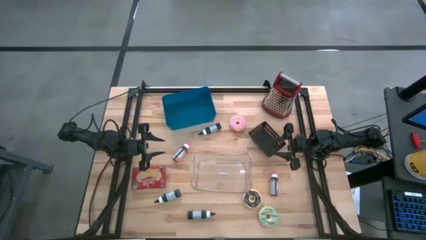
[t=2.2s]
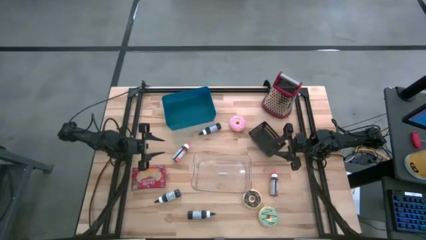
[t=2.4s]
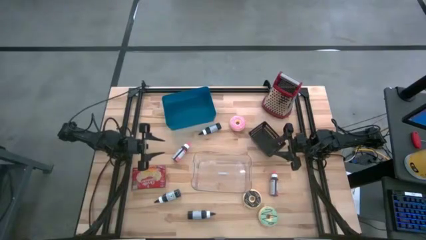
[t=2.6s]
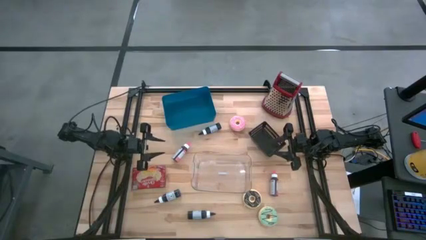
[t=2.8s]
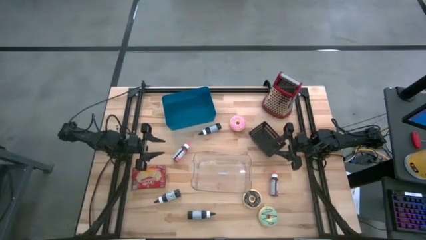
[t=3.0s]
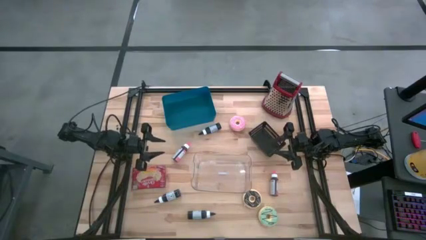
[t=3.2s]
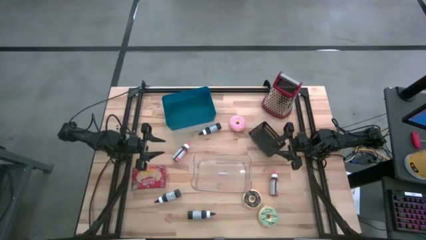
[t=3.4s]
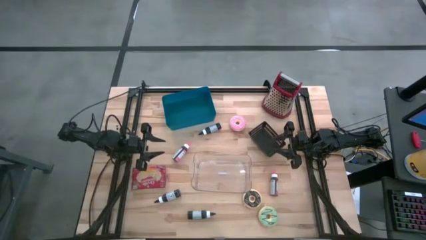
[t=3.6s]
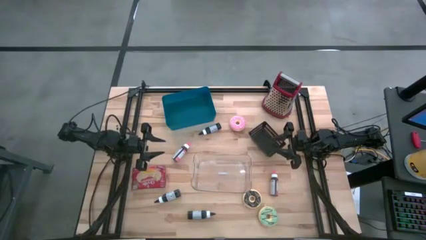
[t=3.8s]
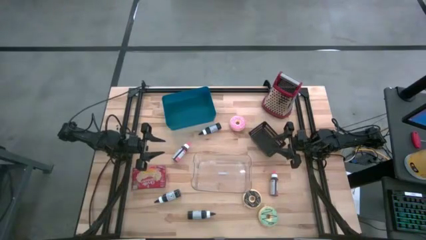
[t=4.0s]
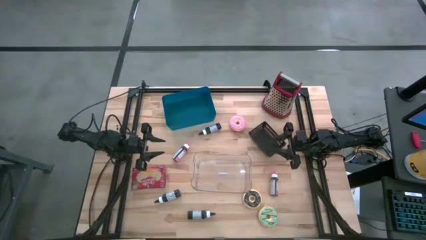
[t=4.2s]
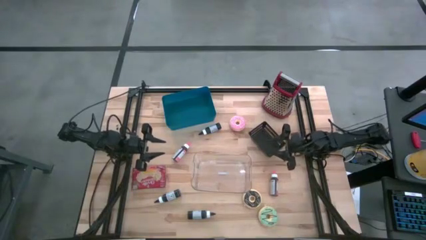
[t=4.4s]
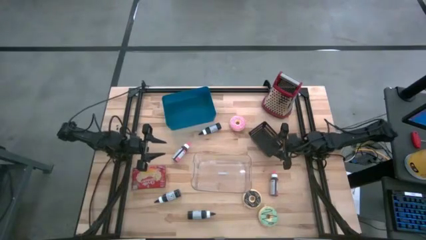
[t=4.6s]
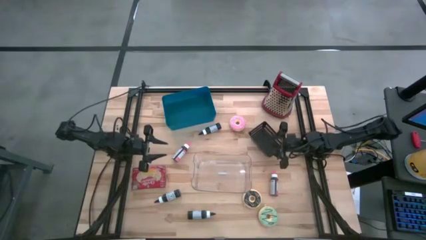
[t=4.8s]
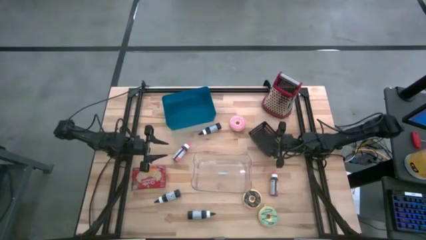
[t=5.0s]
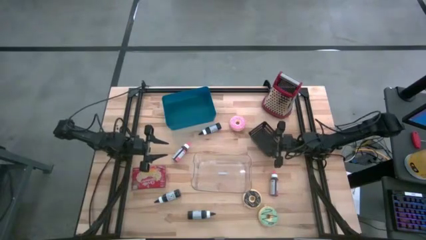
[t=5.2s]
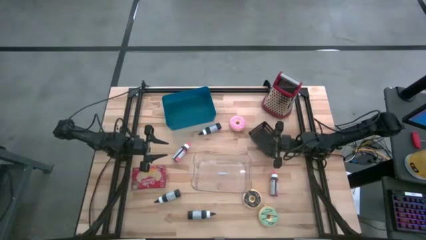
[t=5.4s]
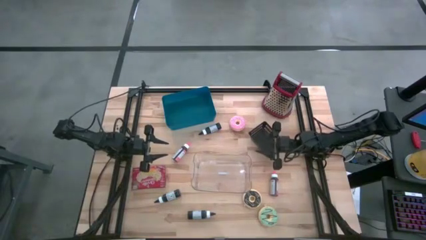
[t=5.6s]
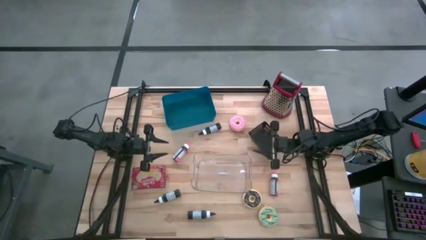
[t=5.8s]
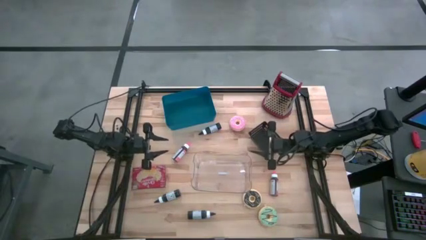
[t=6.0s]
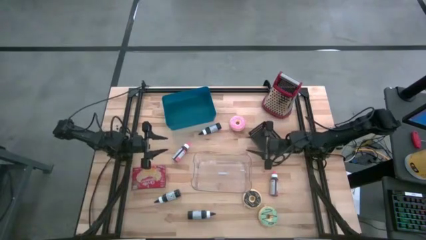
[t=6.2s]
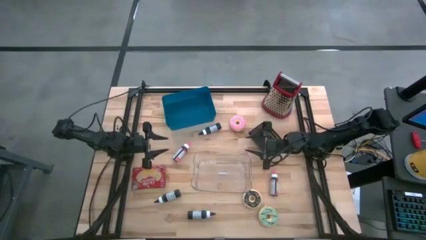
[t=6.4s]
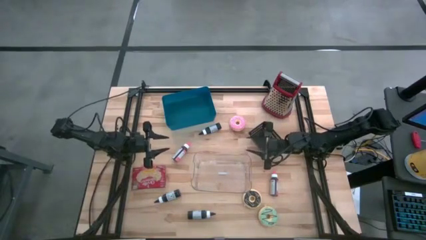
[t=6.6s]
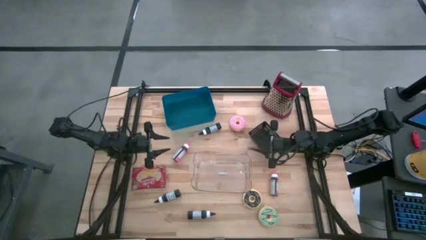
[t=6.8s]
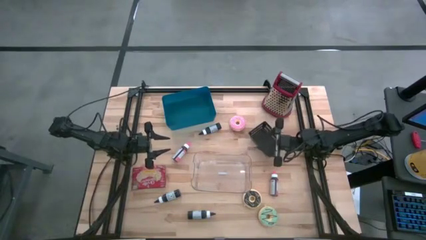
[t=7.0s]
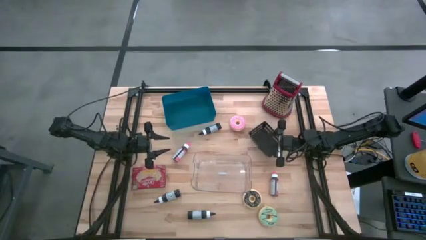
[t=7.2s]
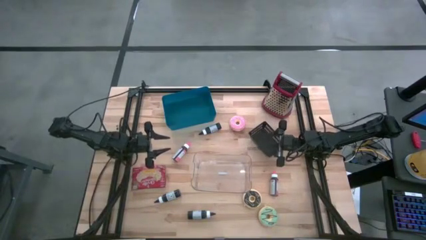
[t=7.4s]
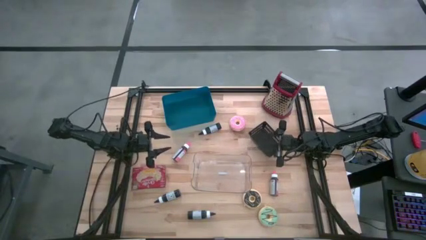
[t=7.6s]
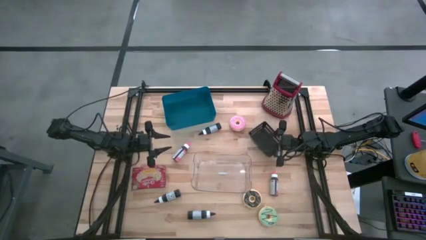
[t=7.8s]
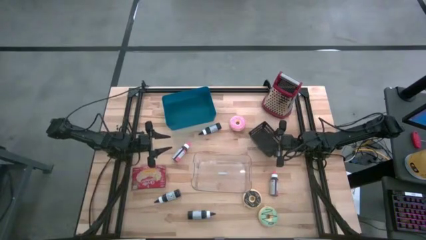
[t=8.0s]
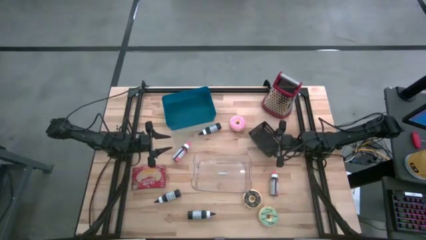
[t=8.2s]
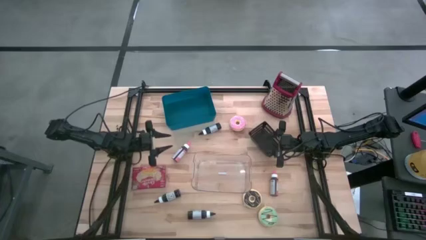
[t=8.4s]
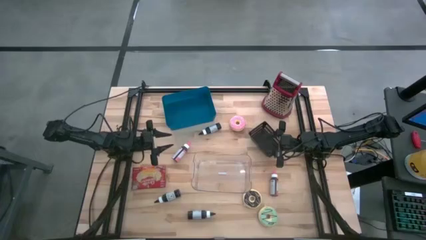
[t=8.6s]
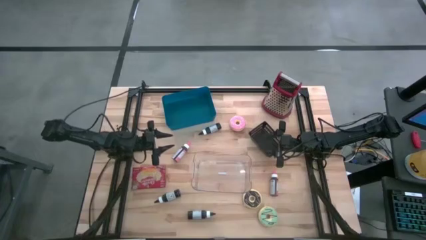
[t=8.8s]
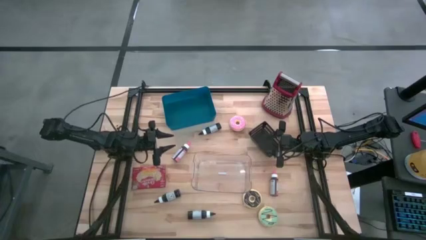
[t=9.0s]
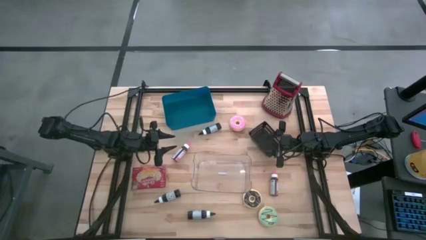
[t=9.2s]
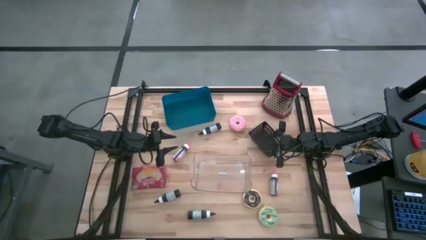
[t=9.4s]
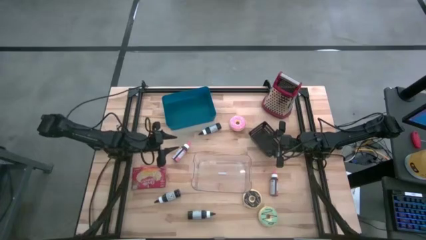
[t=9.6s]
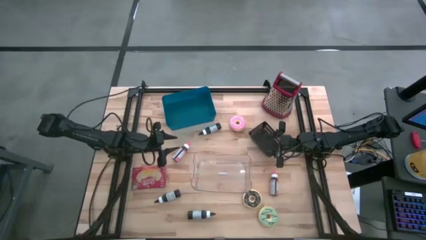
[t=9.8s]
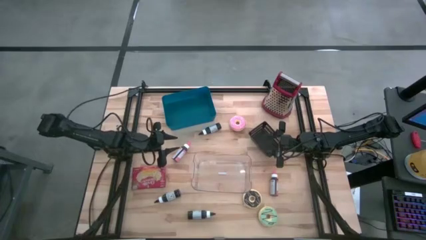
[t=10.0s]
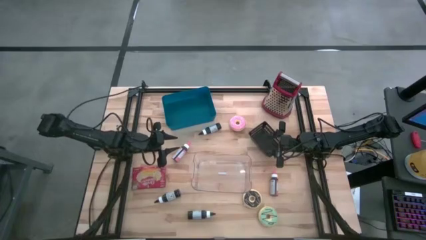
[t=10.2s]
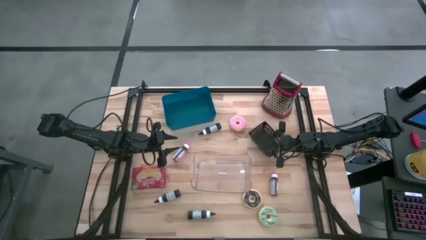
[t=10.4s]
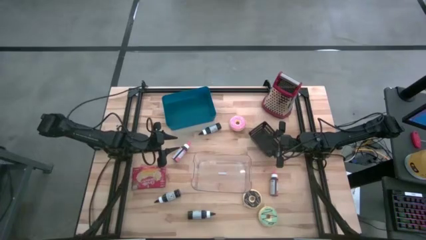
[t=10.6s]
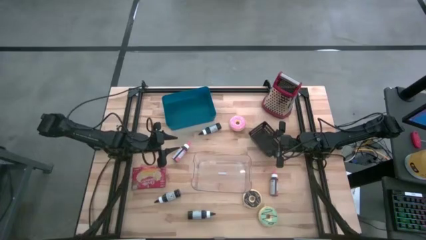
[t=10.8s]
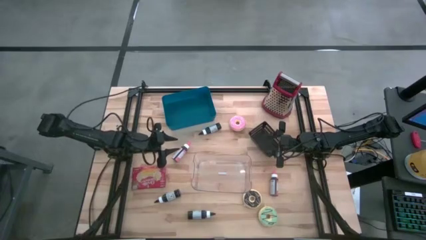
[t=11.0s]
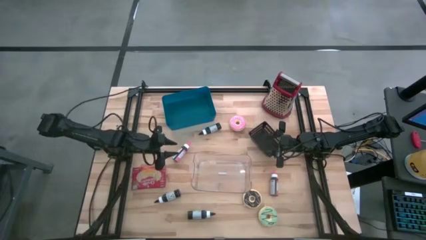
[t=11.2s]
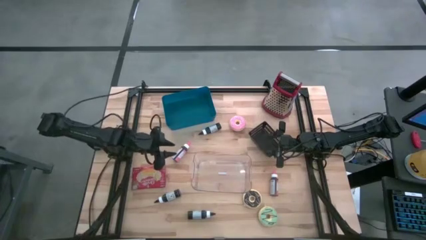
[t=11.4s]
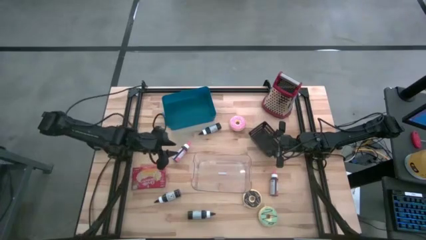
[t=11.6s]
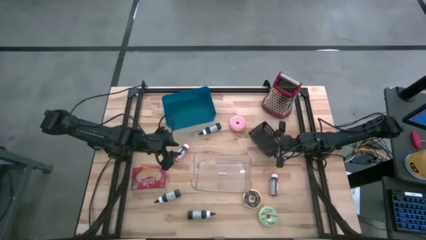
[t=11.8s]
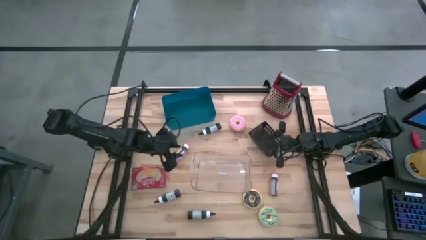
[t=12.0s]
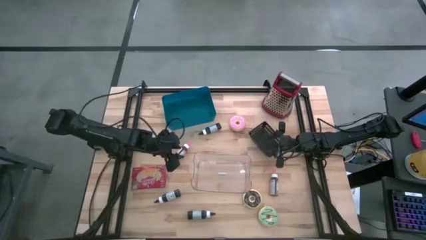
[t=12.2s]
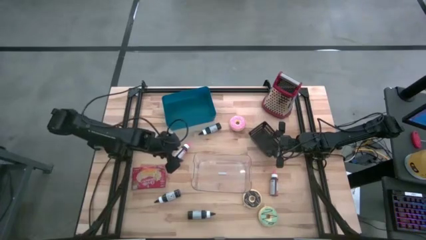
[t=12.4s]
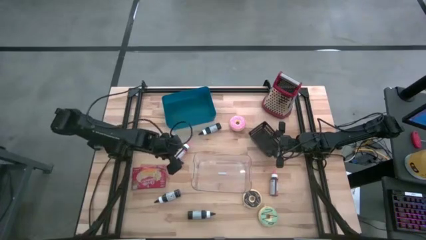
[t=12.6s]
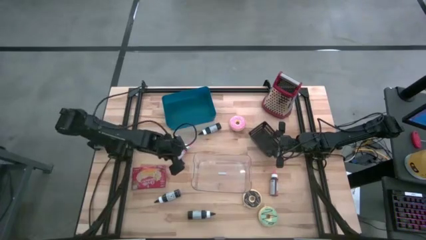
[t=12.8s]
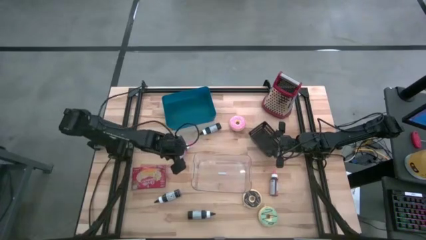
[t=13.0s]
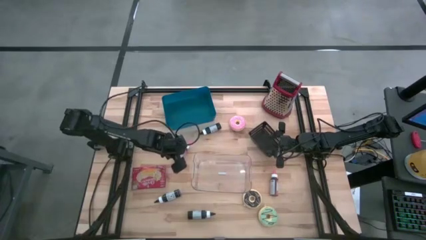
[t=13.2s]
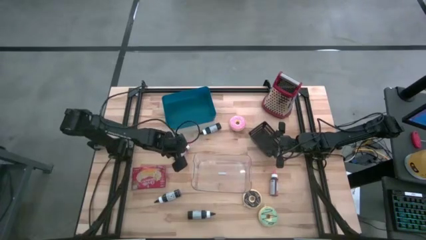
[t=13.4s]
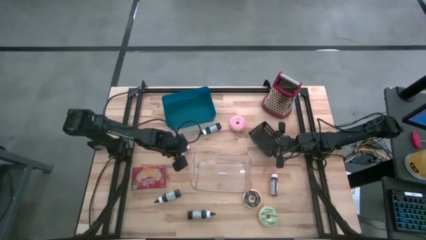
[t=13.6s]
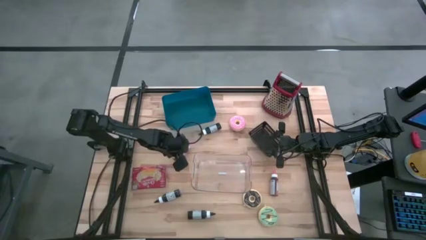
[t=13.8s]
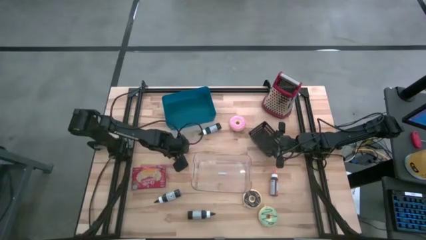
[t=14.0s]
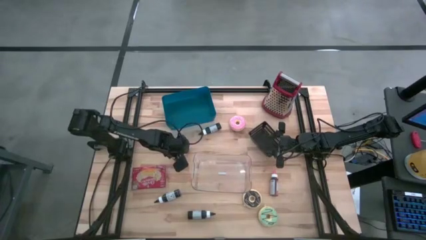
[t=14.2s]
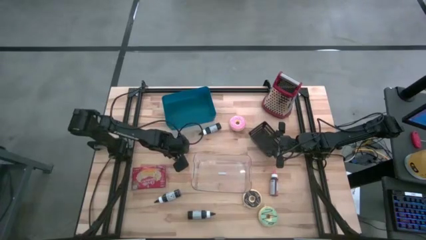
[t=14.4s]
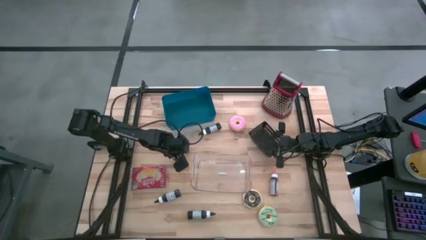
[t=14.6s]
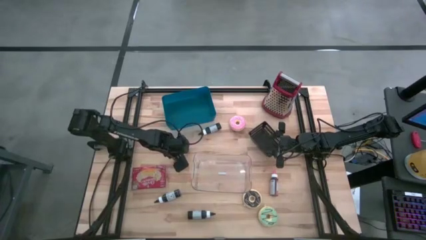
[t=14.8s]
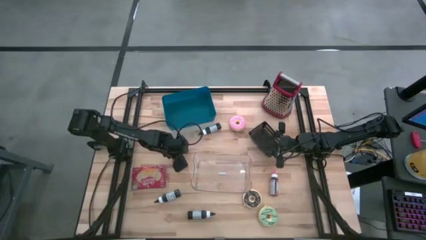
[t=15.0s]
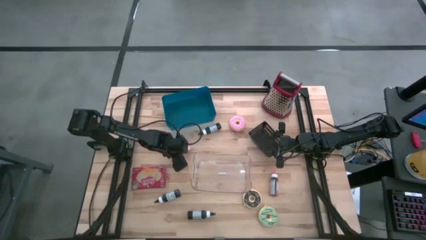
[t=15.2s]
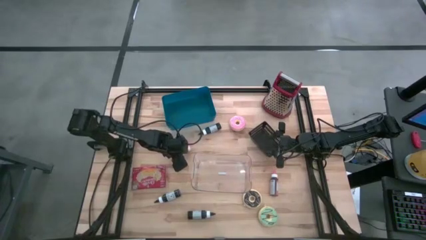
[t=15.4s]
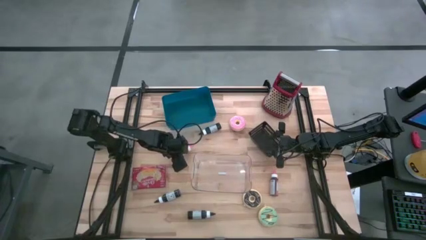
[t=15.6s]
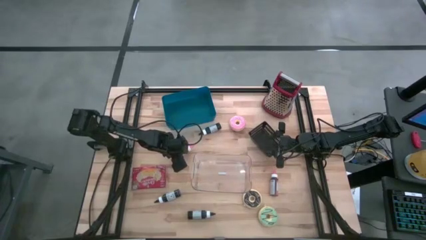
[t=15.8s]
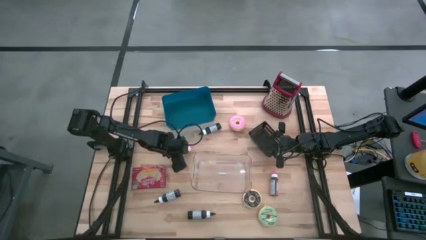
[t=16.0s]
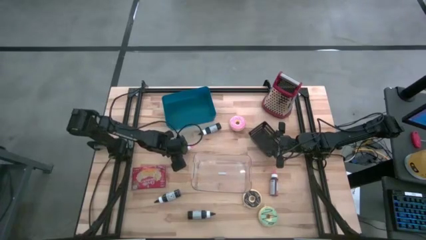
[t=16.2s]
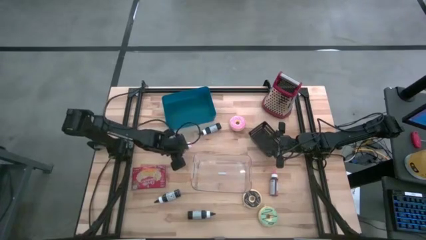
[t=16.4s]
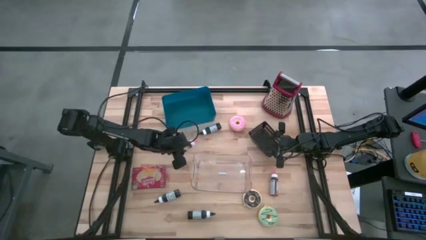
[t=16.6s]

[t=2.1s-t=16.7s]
Put the left pink food coloring bottle into the transparent bin
